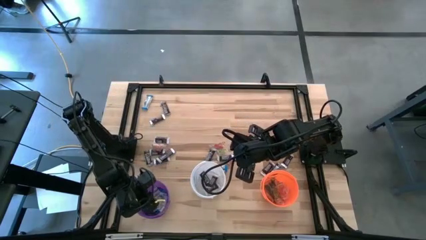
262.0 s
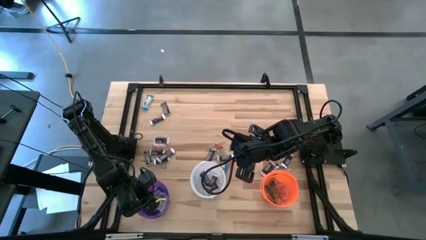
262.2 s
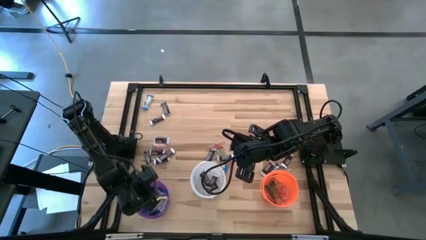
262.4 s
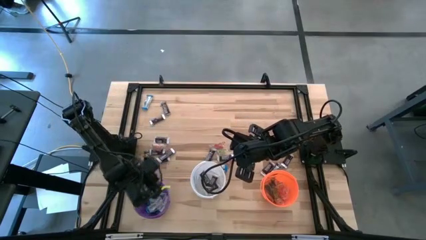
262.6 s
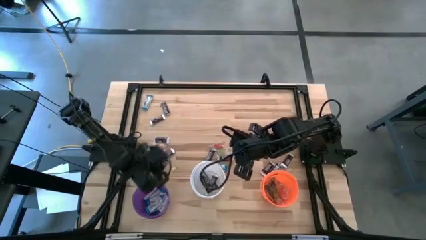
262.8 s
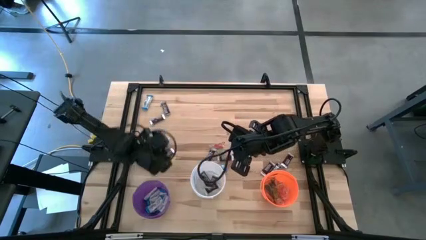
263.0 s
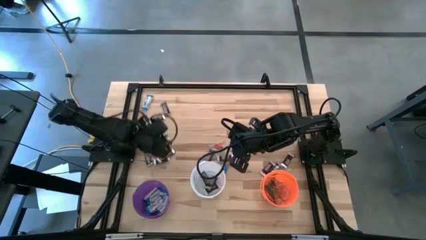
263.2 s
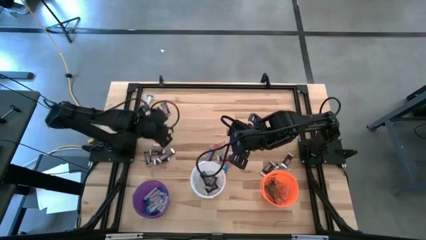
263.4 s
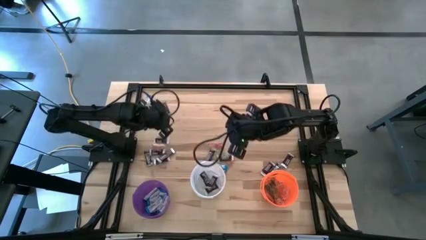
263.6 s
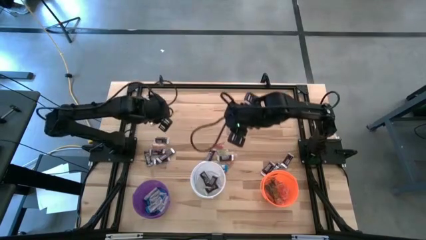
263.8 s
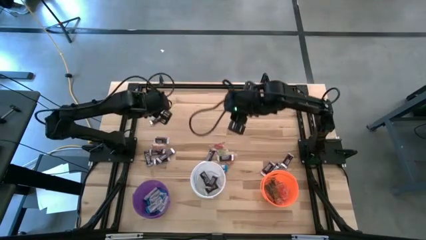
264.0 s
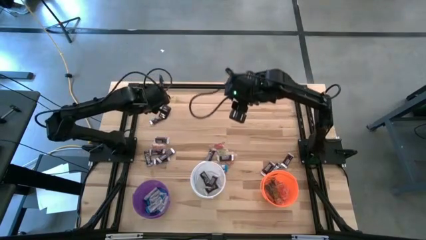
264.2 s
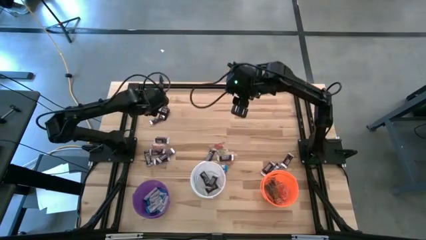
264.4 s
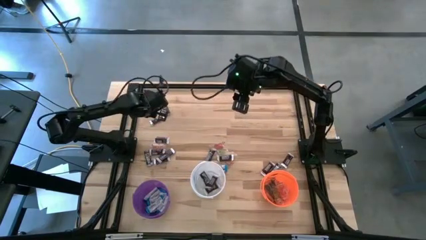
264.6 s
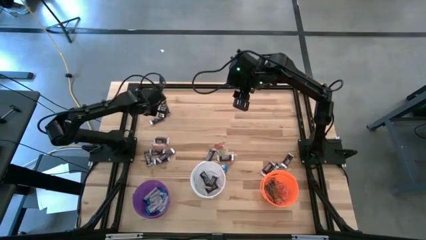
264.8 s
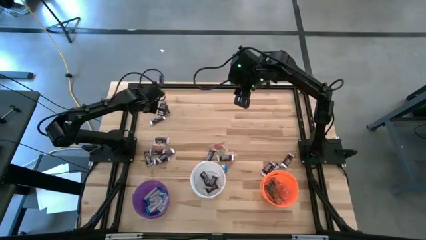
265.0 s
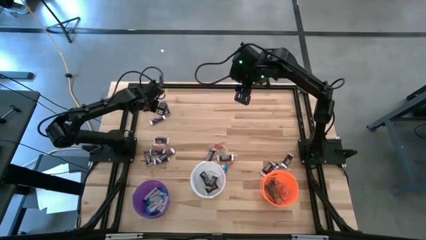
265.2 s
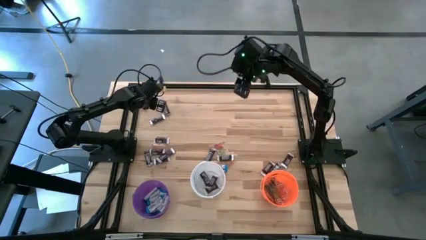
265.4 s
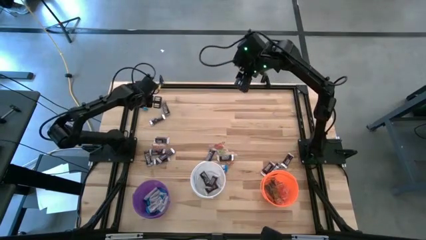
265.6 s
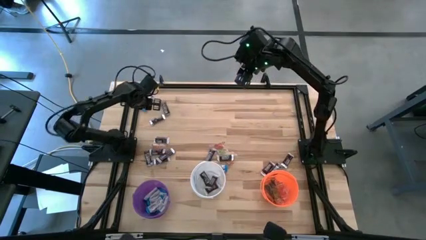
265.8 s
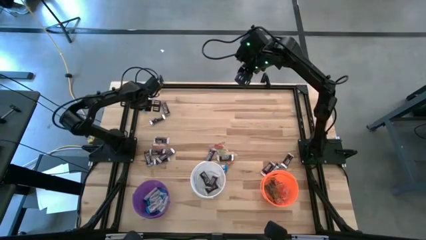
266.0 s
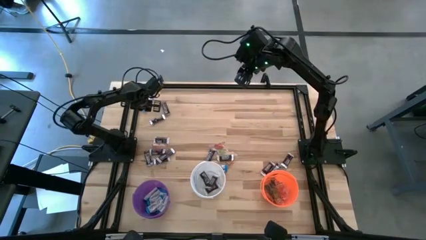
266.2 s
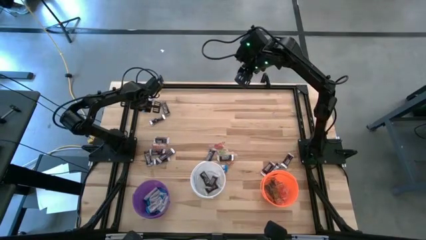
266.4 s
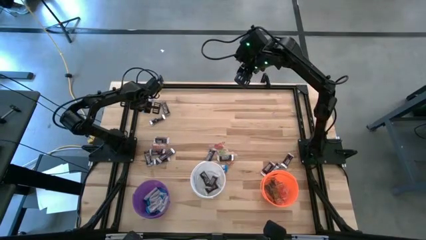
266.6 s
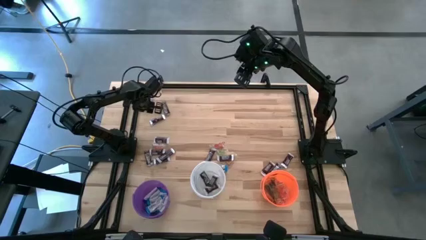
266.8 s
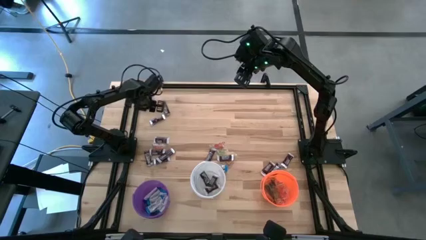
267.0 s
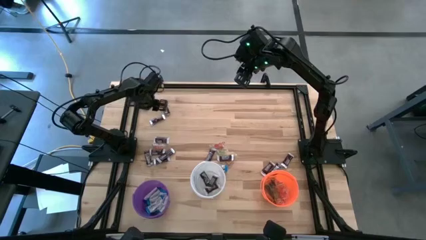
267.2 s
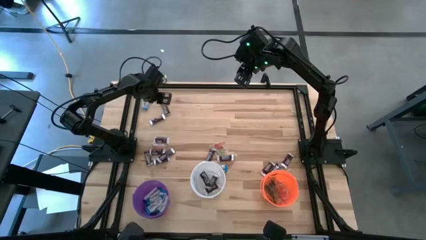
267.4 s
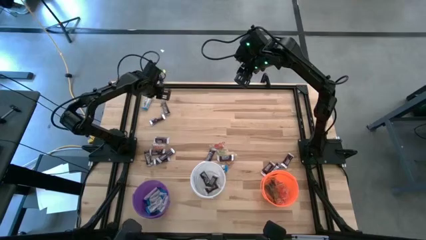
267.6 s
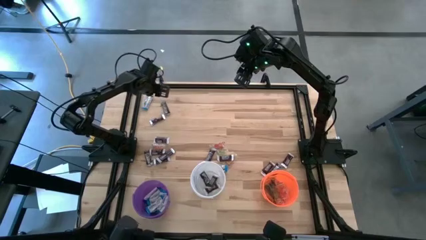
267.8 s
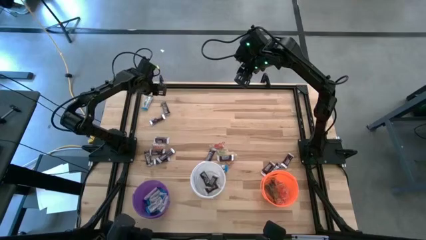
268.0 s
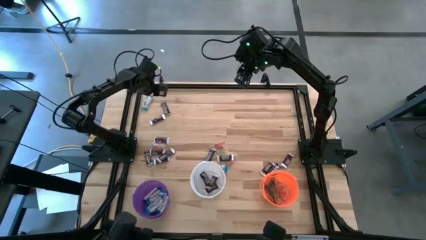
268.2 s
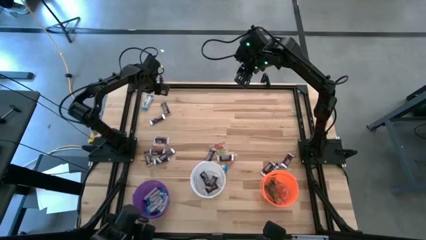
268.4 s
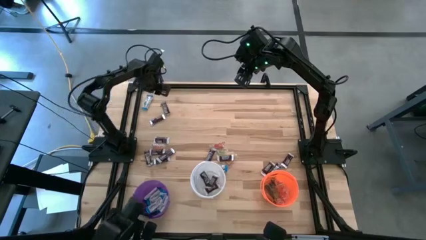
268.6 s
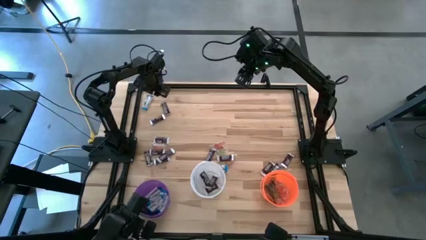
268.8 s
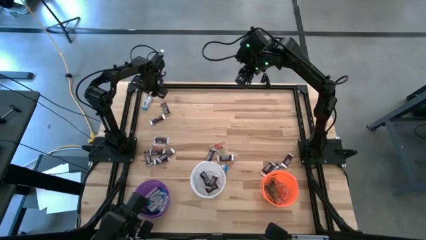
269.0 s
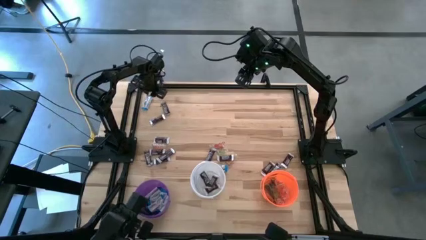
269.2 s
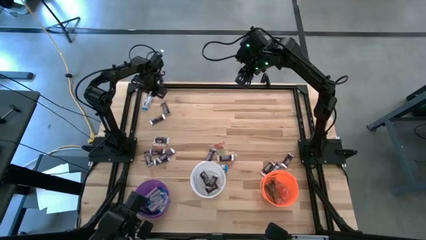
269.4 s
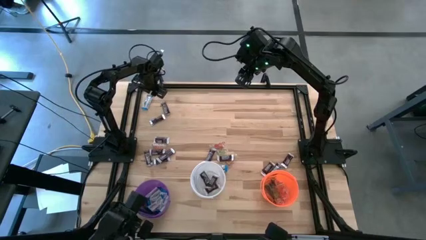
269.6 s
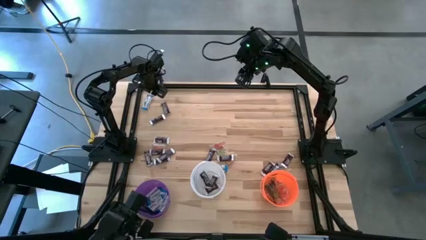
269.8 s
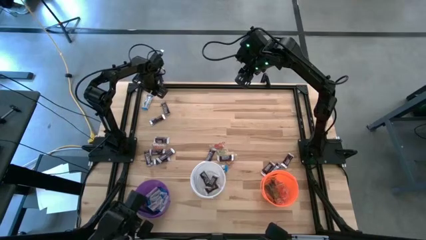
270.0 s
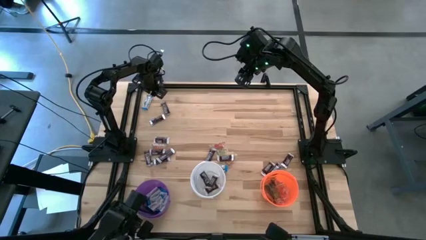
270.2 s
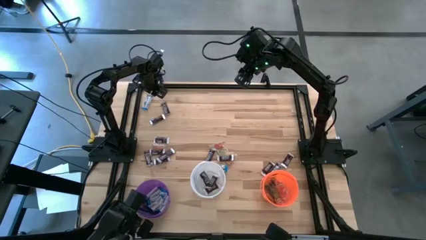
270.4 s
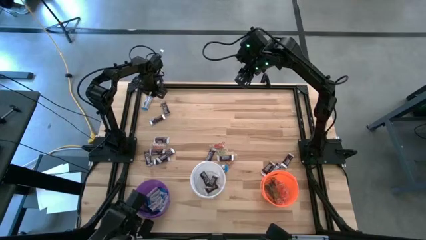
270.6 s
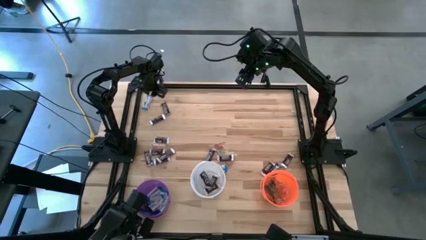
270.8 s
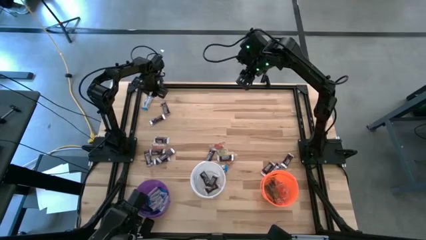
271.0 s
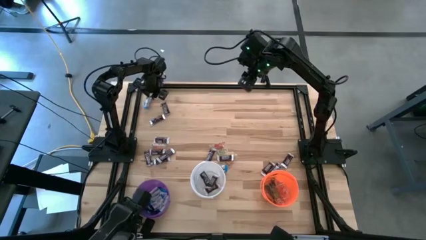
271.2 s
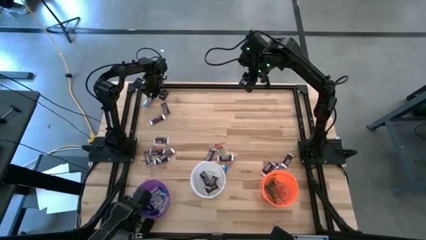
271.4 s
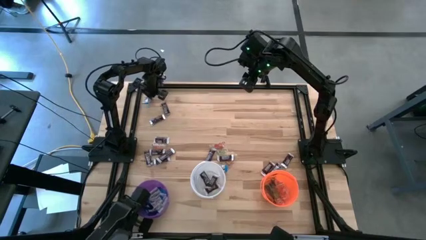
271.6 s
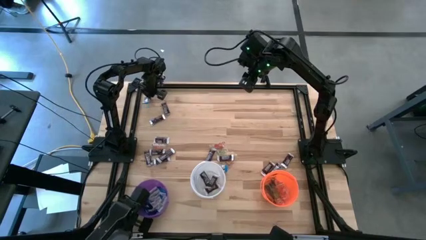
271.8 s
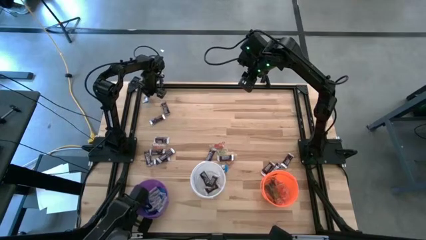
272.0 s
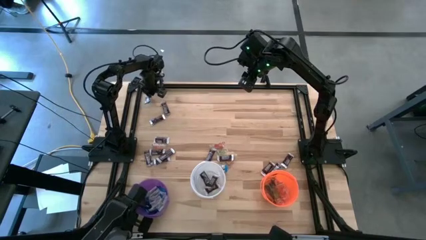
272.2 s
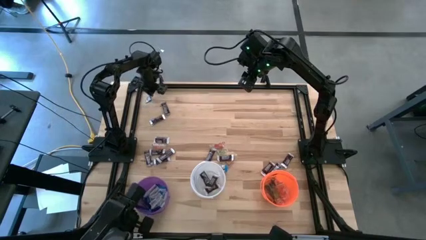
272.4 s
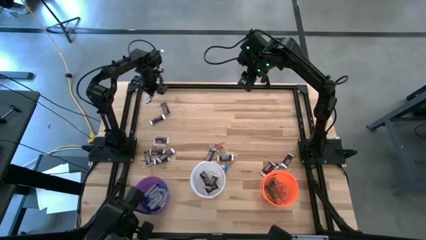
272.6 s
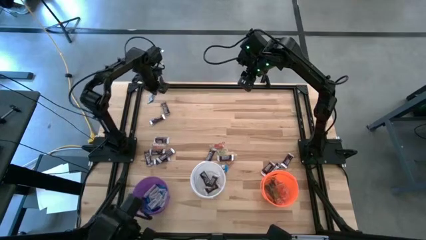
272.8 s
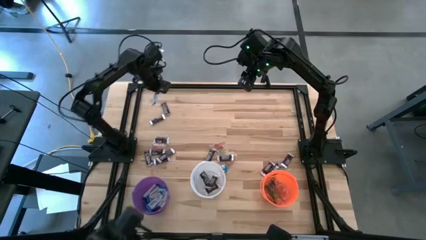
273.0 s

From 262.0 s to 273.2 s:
Task: Sort candy
Put the white chocolate into the violet bucket

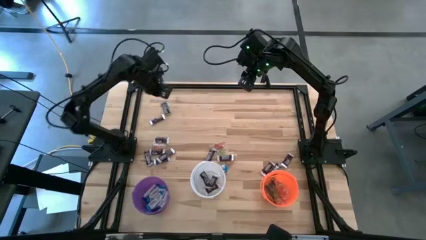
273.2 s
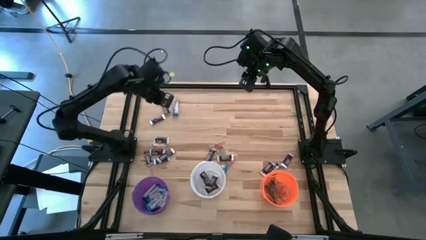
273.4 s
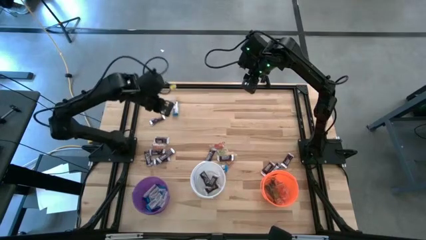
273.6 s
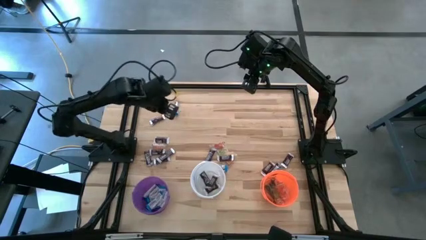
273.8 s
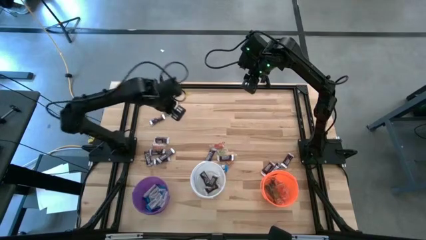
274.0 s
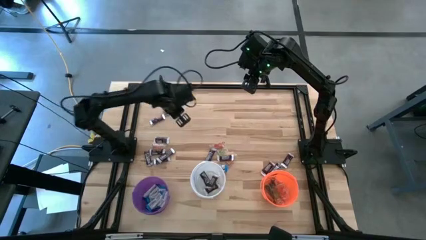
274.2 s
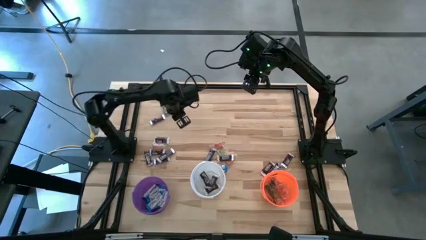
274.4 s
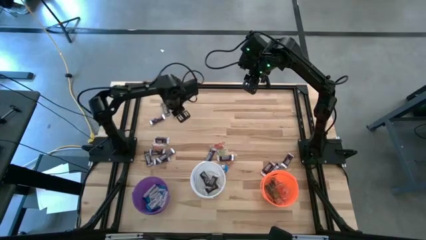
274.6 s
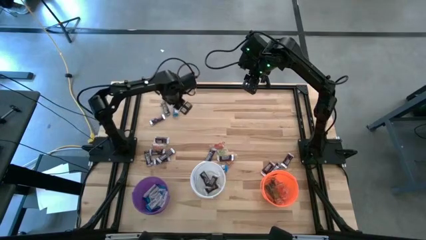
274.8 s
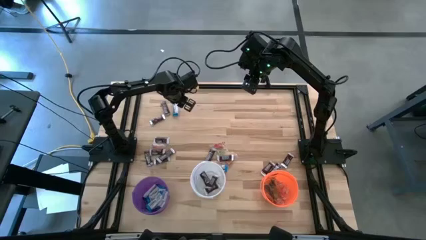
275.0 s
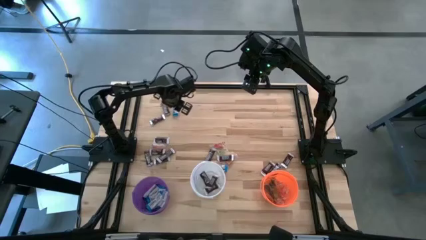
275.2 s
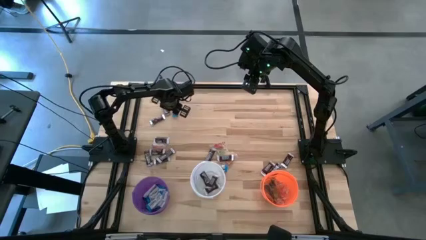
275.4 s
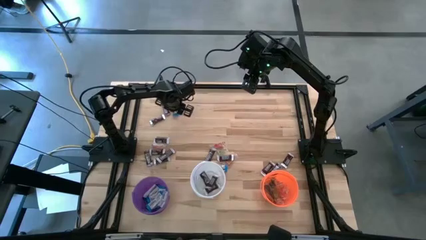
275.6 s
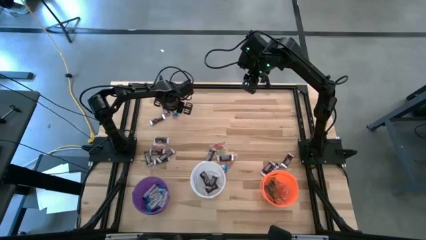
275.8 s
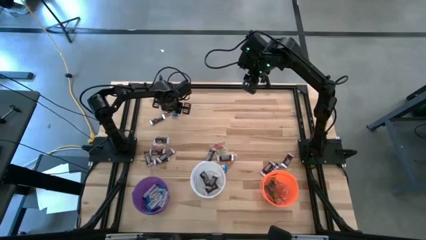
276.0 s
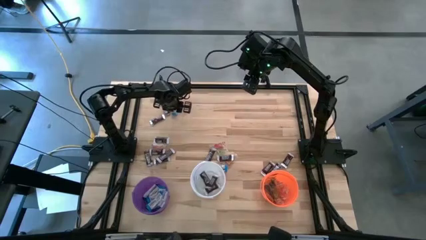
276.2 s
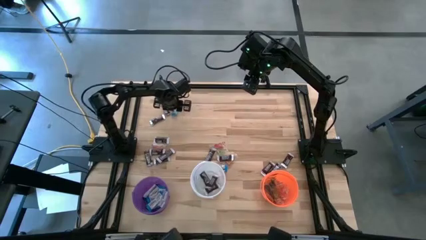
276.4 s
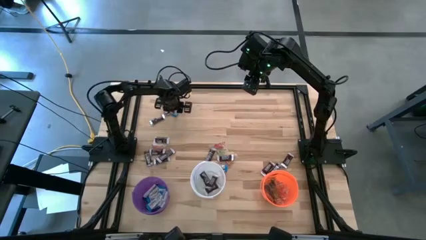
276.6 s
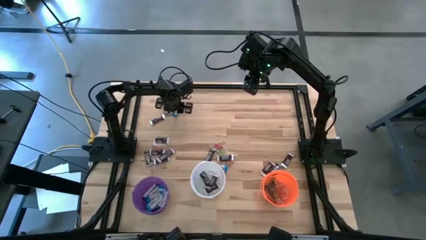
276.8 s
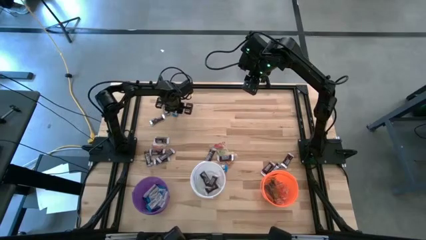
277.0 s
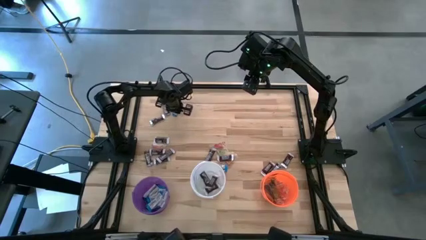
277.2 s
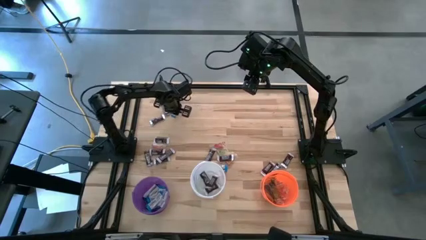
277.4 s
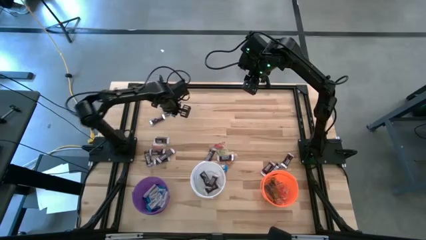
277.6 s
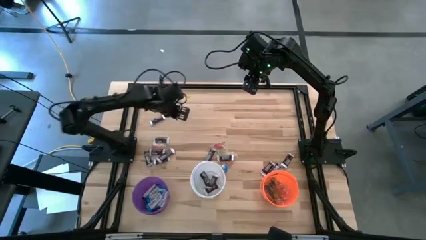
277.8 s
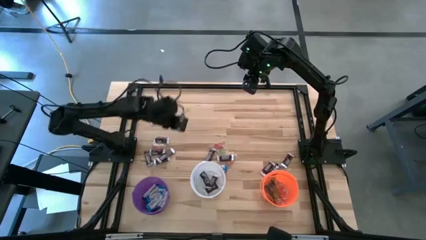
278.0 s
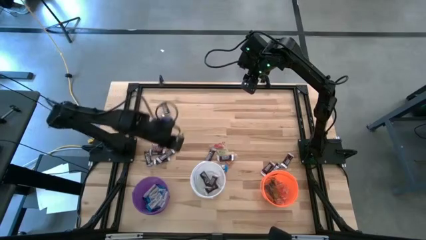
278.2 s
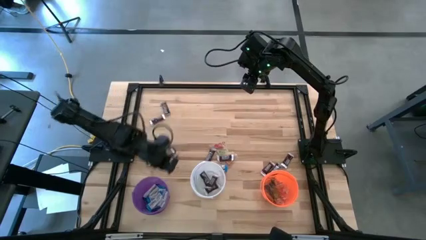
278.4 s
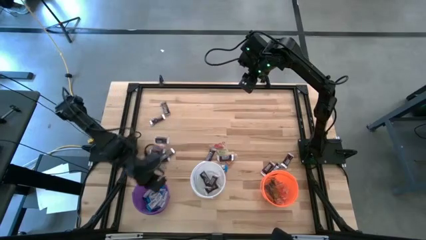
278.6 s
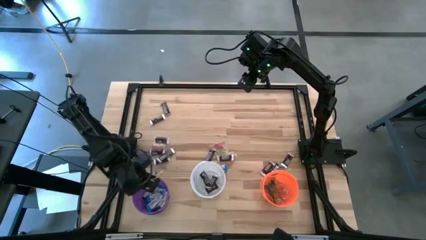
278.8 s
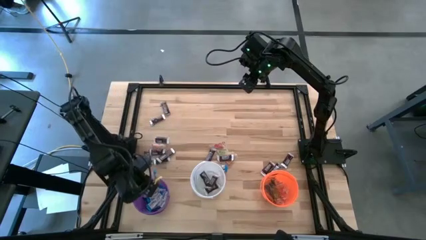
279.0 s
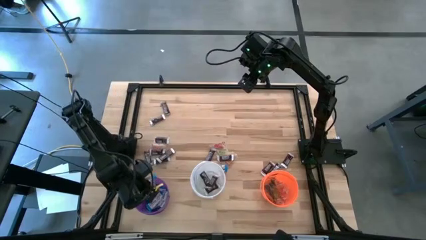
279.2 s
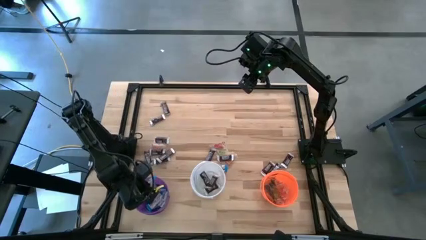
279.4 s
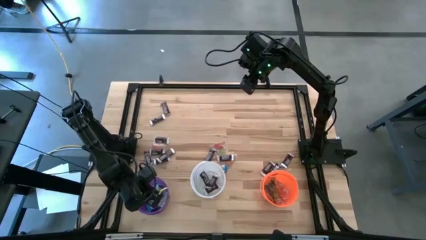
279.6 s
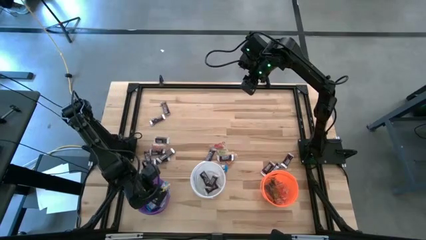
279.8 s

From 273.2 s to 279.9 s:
Put the white chocolate into the violet bucket
